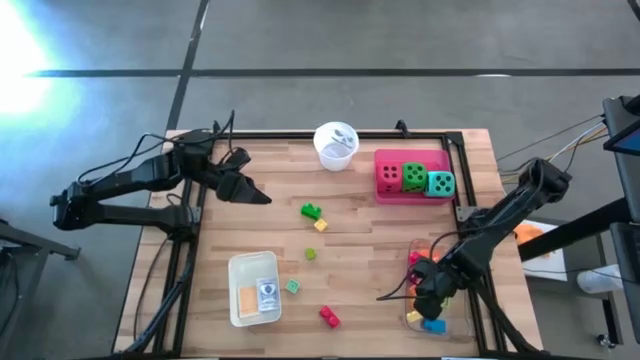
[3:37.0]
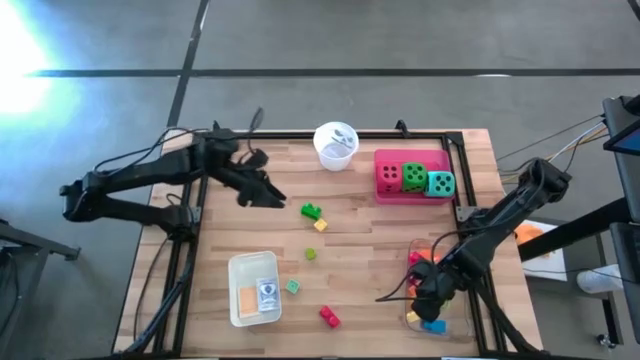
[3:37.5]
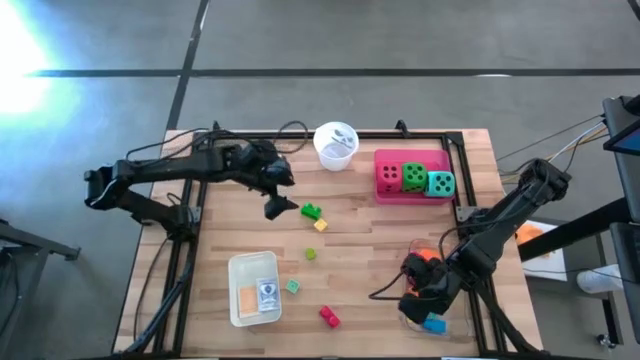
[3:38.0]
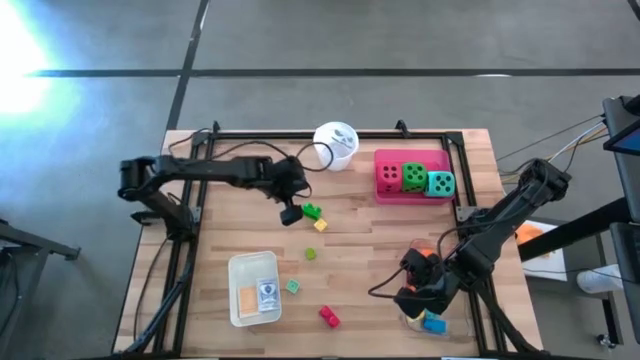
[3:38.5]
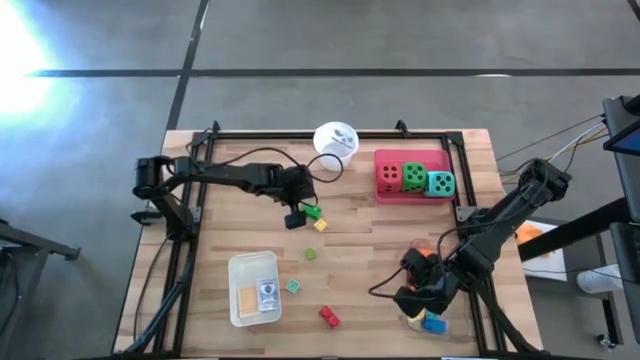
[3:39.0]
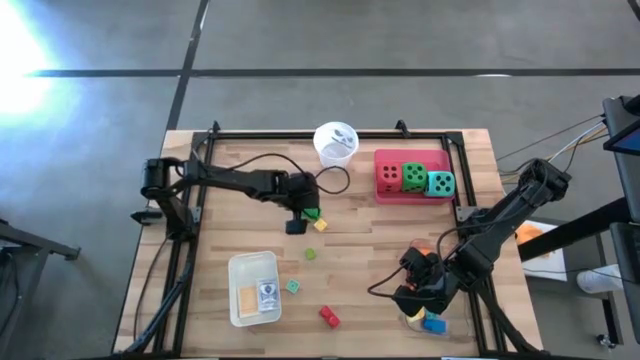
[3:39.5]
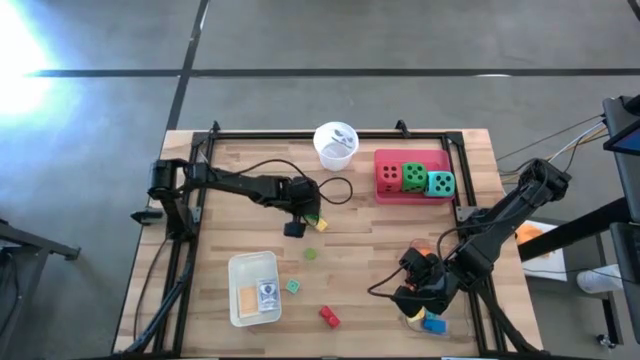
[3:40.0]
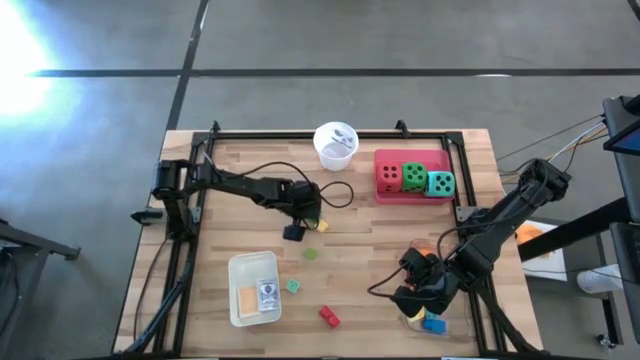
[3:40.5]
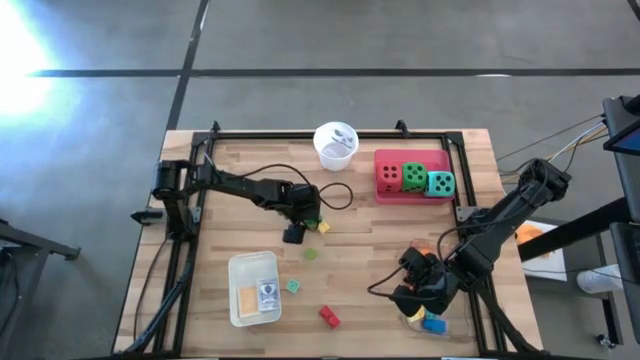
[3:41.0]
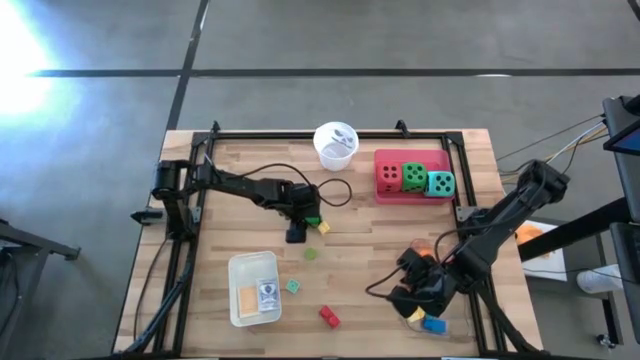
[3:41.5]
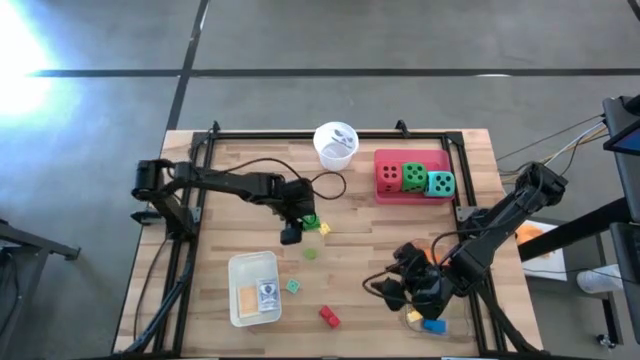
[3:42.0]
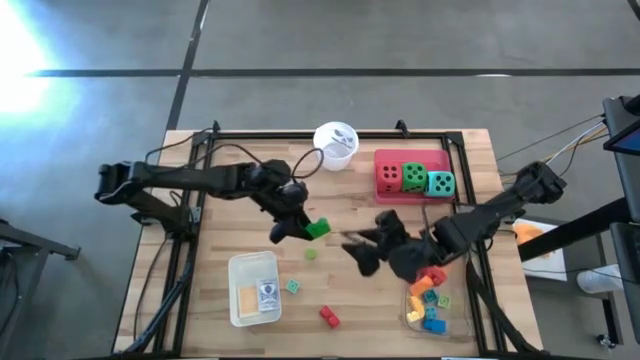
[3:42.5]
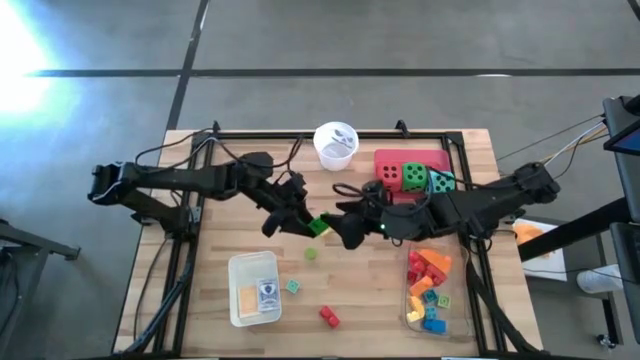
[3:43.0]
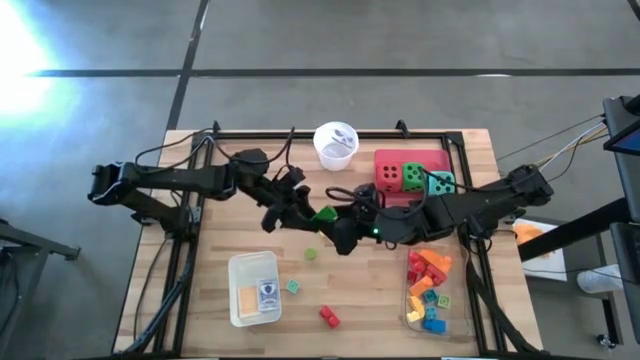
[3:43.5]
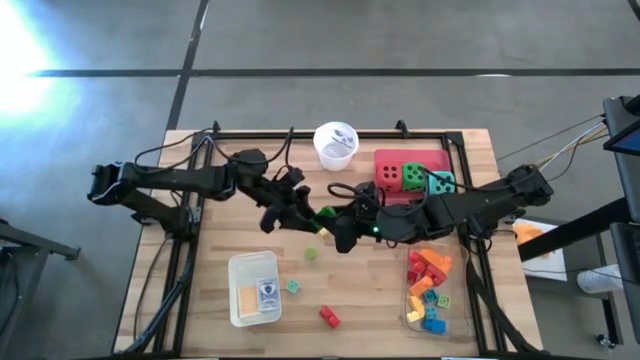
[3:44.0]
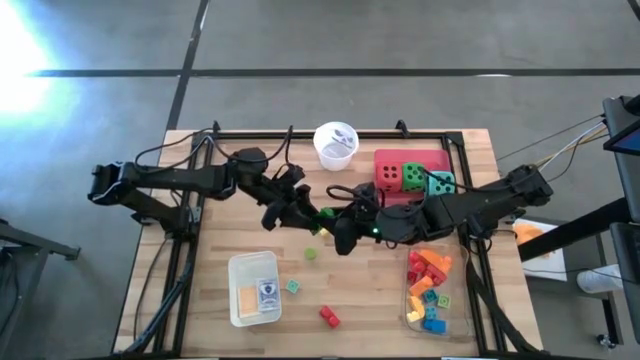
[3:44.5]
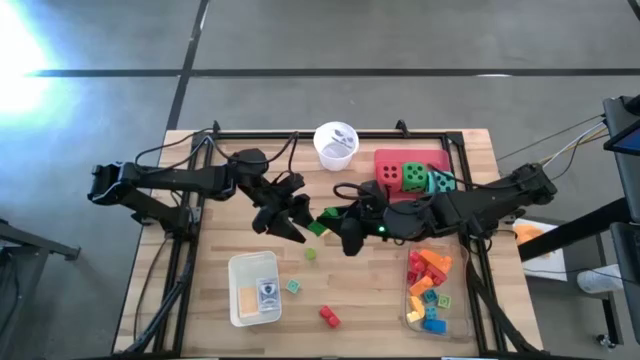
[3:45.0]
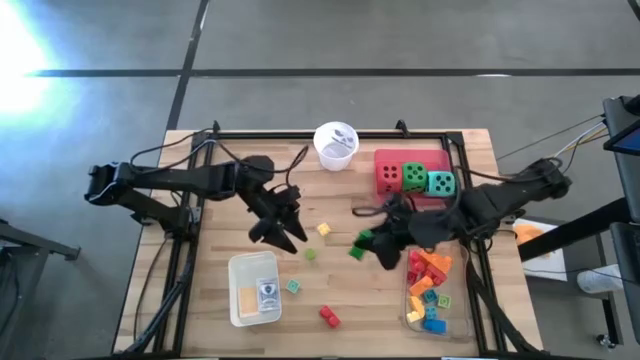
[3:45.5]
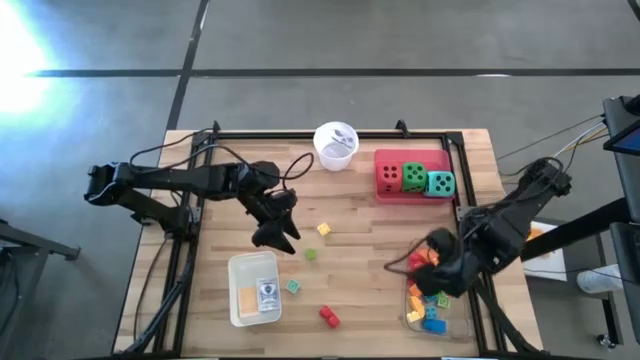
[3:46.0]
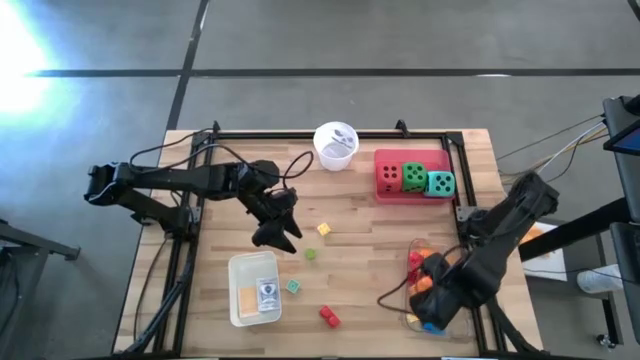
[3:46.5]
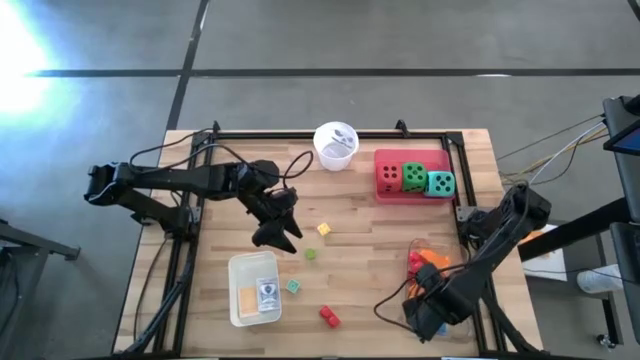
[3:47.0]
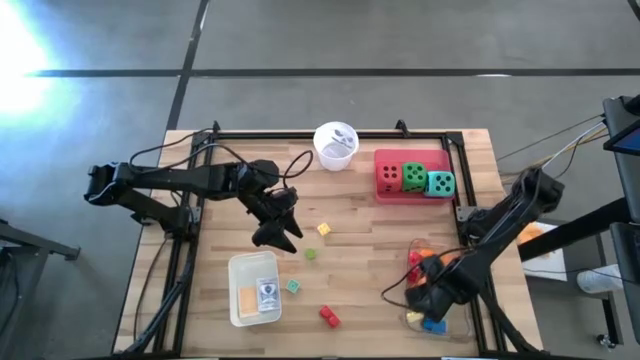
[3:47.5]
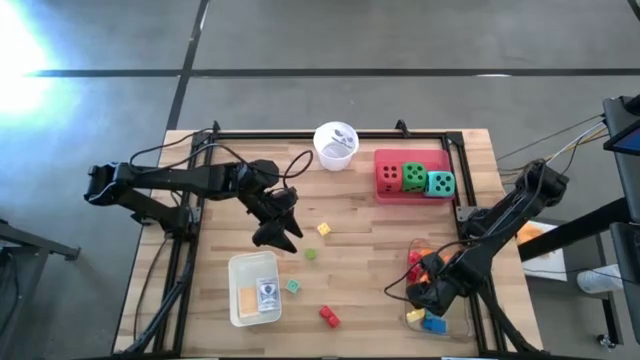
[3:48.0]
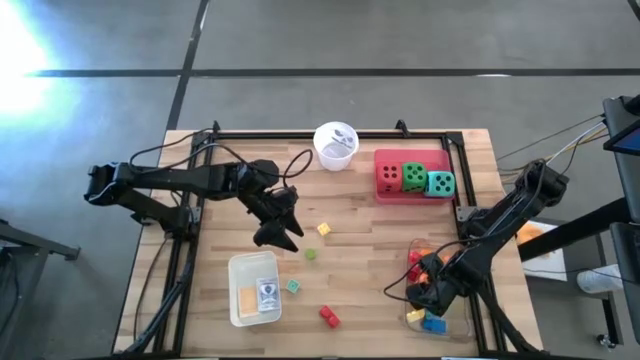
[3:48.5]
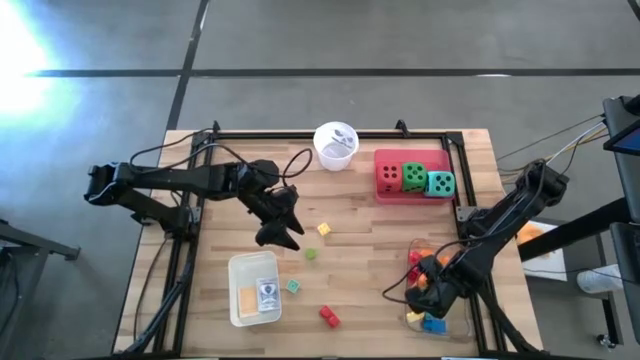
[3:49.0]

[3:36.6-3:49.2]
Task: Pick & Place Toys
Put the green game piece into the transparent bin

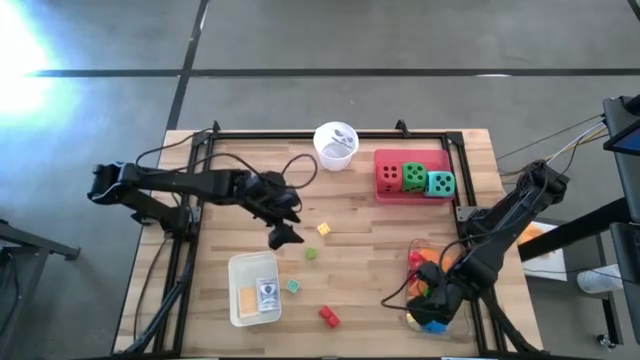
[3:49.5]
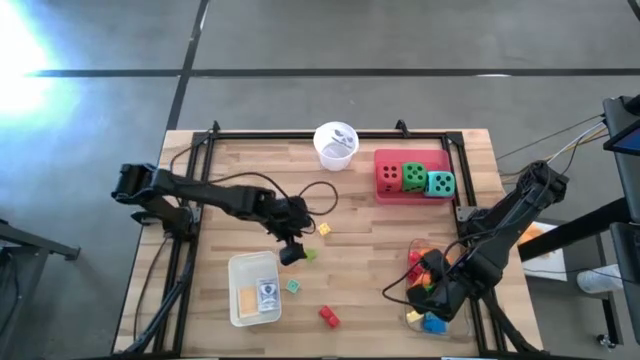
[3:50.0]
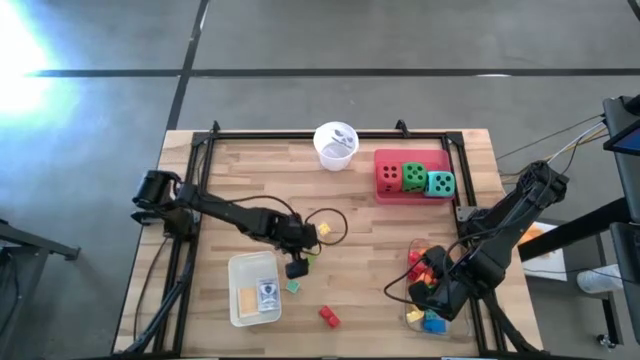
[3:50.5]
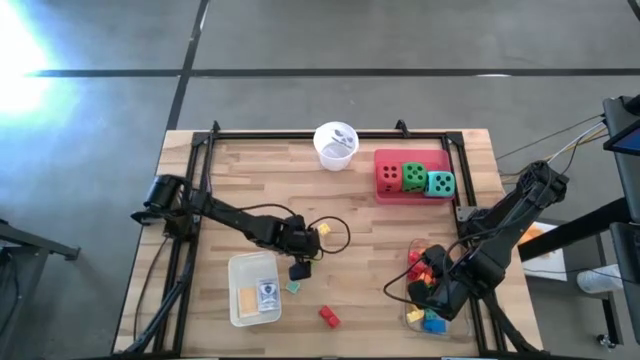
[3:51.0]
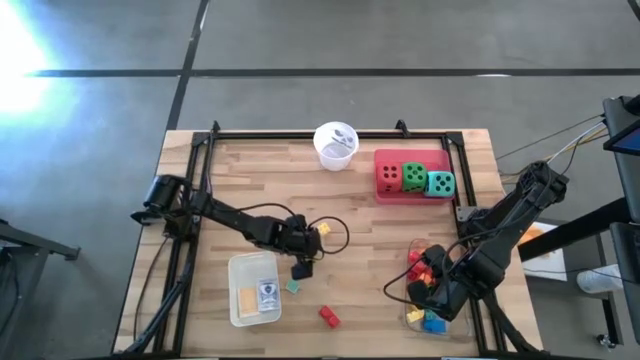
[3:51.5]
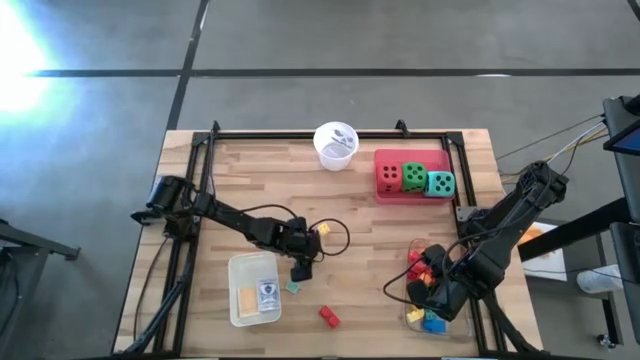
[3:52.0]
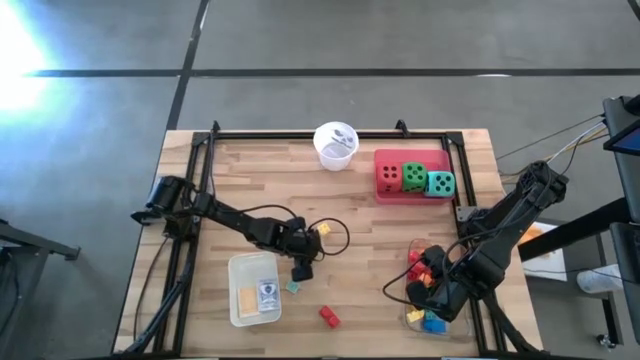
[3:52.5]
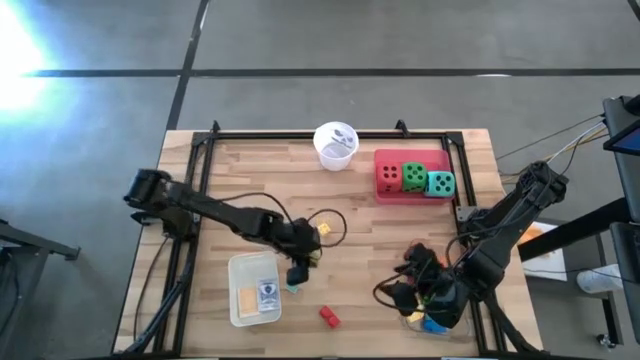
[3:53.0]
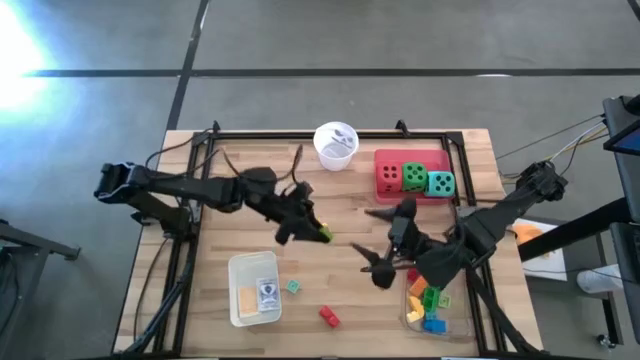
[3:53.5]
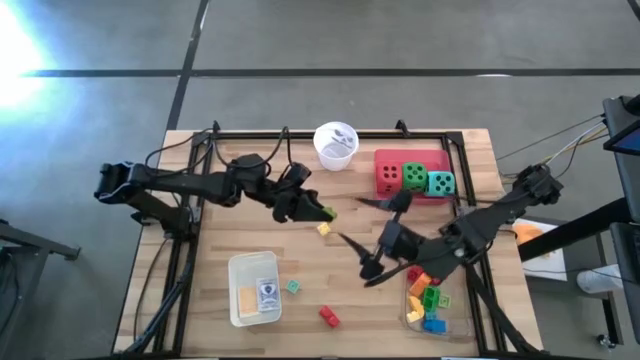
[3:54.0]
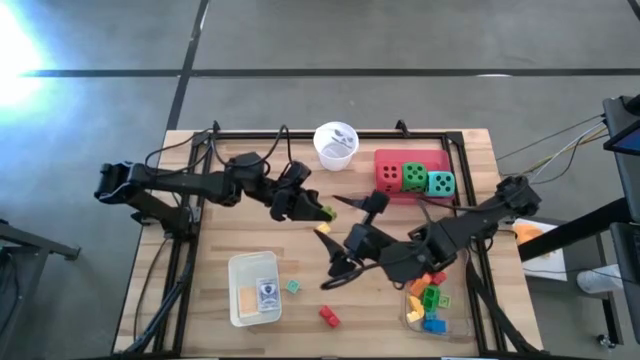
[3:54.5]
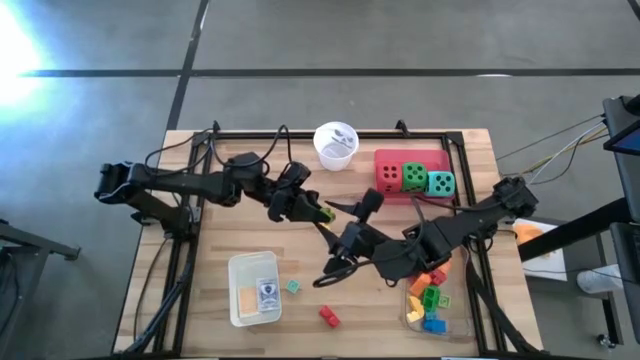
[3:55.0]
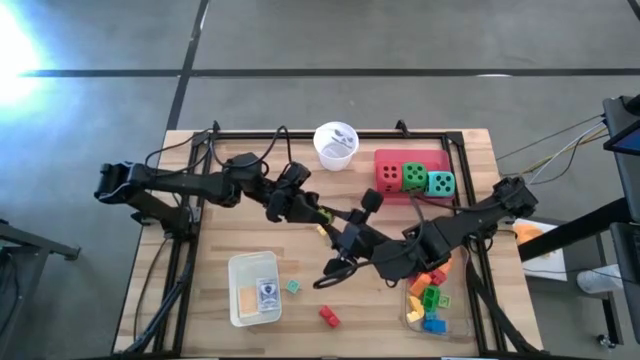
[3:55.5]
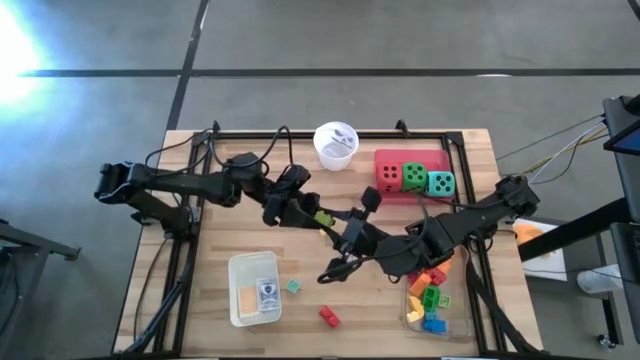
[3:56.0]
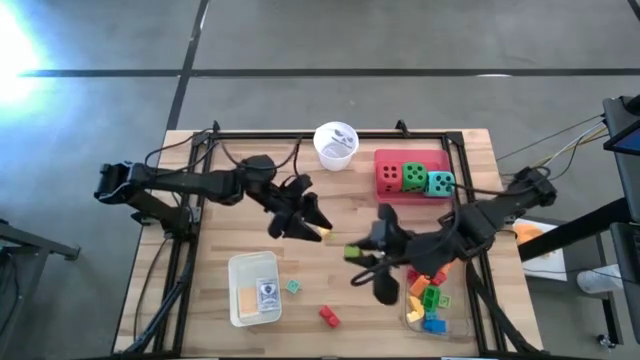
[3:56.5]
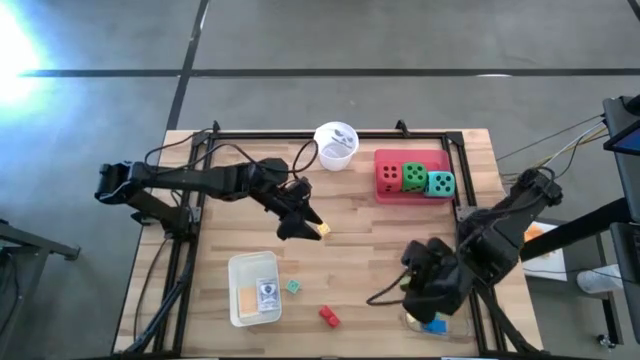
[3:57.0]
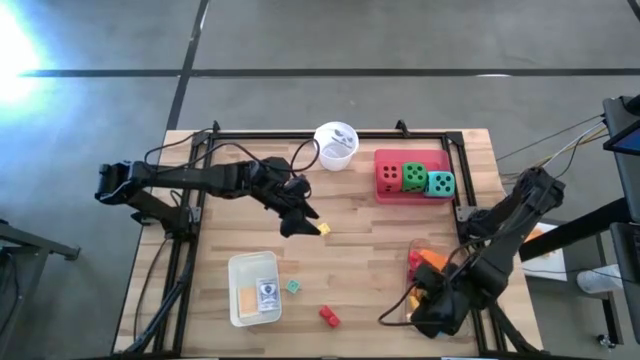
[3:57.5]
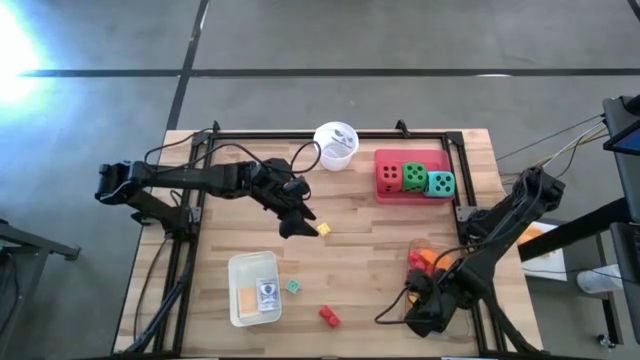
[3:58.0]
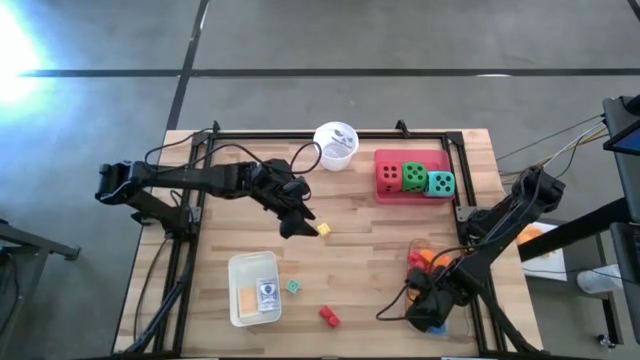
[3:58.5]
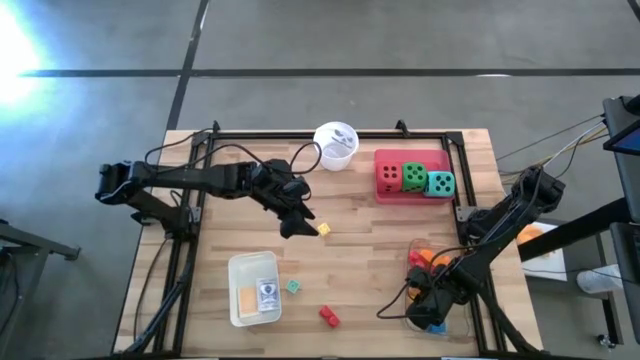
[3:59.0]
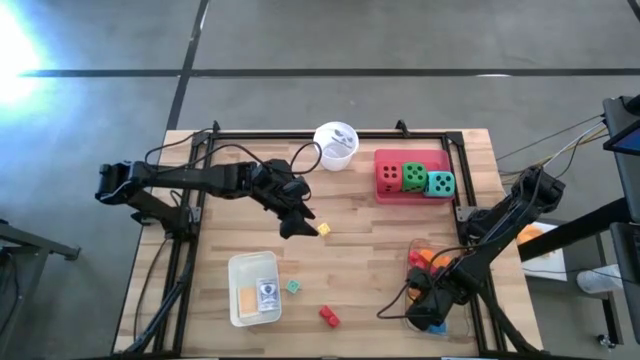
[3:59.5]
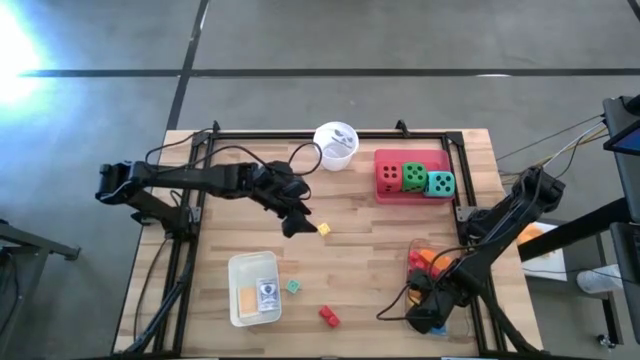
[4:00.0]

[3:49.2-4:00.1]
Put the light green game piece into the transparent bin
